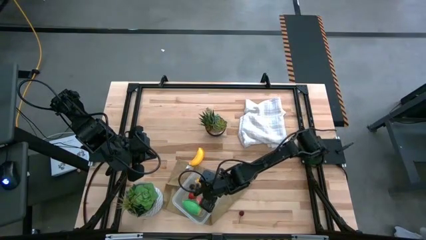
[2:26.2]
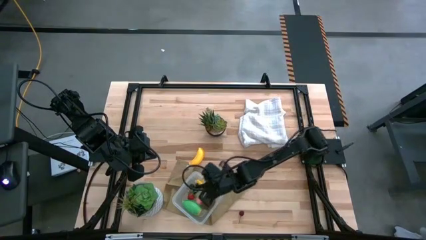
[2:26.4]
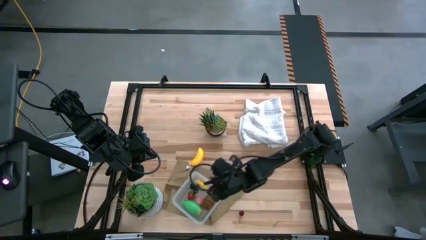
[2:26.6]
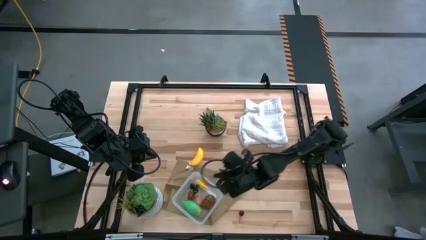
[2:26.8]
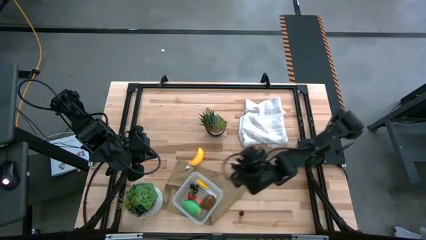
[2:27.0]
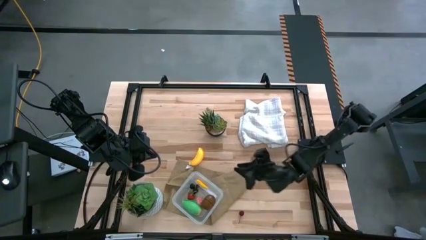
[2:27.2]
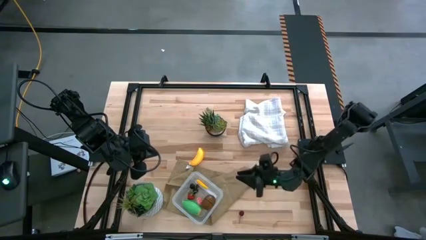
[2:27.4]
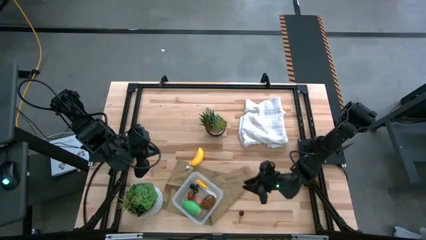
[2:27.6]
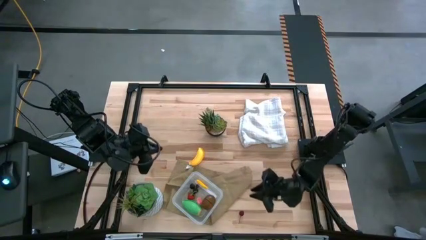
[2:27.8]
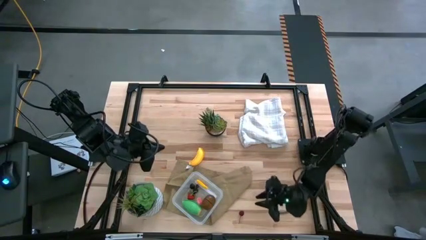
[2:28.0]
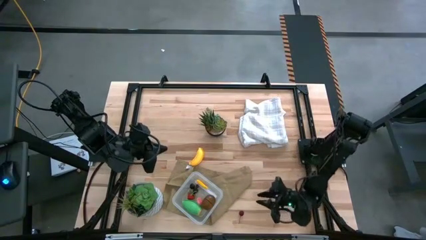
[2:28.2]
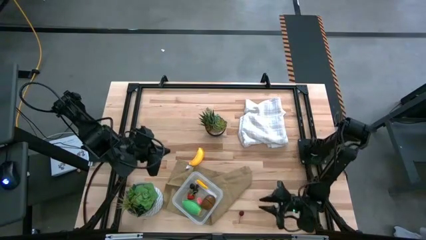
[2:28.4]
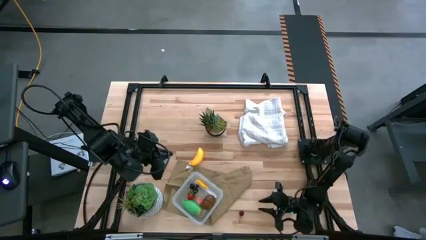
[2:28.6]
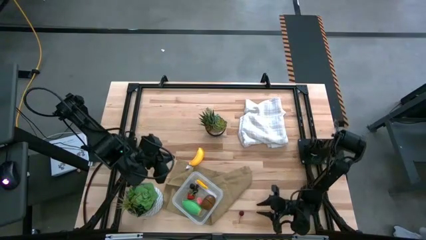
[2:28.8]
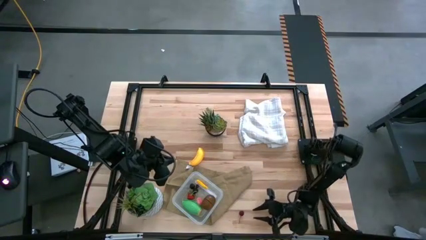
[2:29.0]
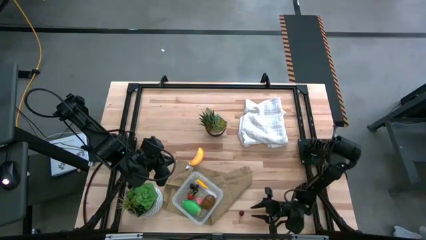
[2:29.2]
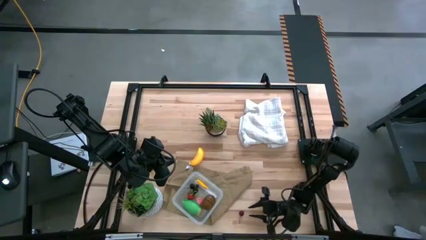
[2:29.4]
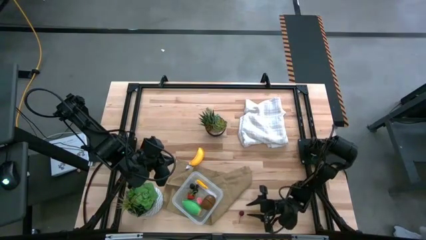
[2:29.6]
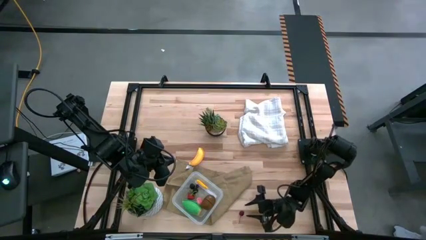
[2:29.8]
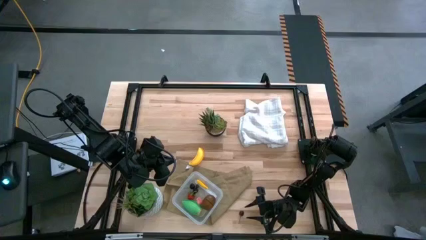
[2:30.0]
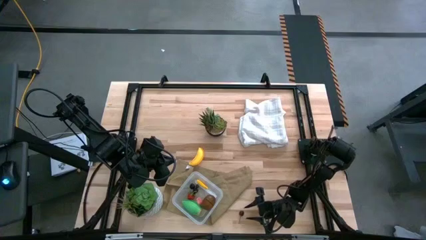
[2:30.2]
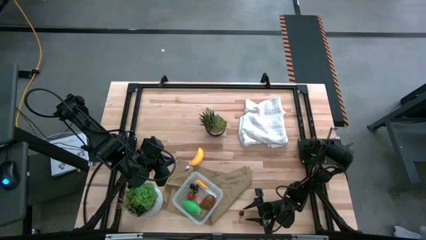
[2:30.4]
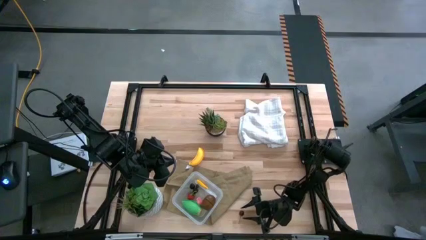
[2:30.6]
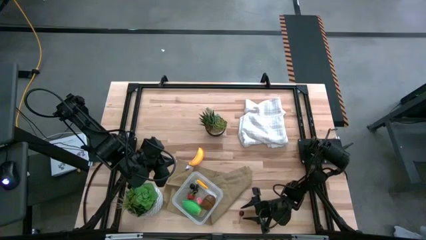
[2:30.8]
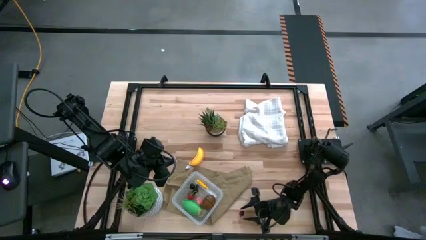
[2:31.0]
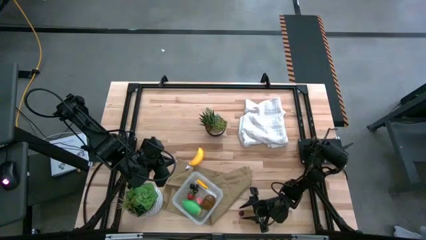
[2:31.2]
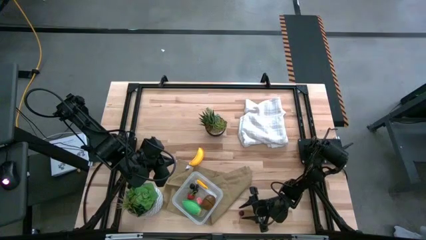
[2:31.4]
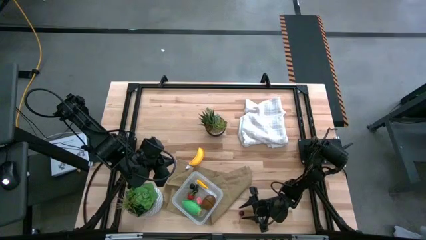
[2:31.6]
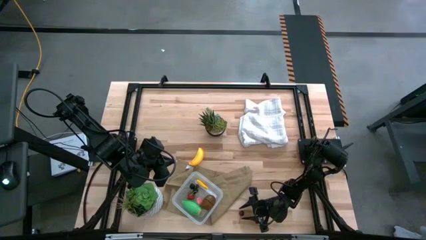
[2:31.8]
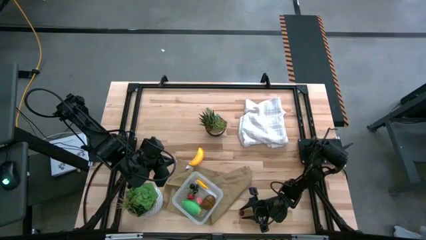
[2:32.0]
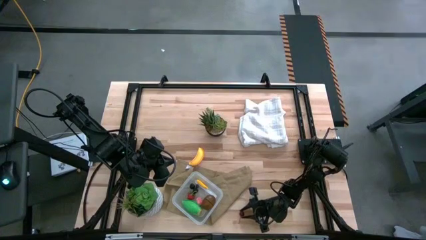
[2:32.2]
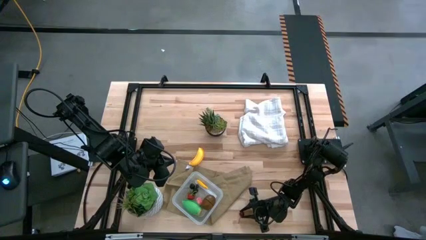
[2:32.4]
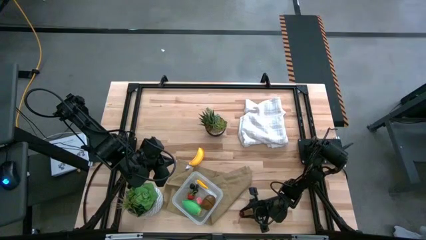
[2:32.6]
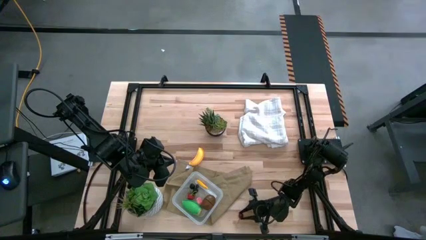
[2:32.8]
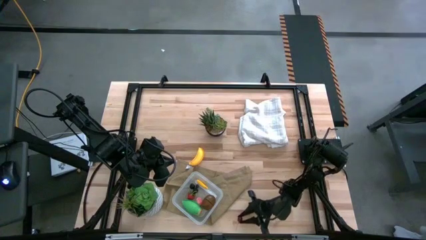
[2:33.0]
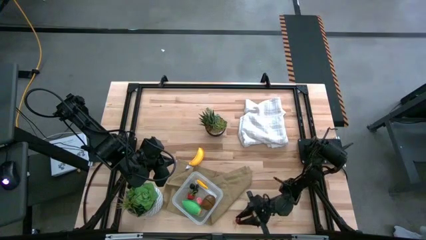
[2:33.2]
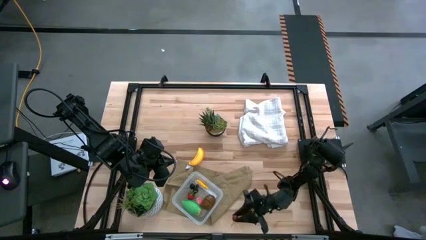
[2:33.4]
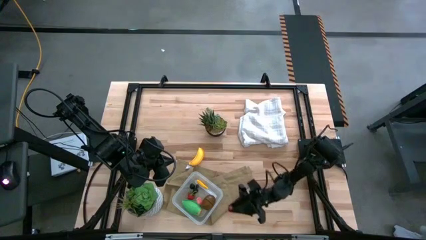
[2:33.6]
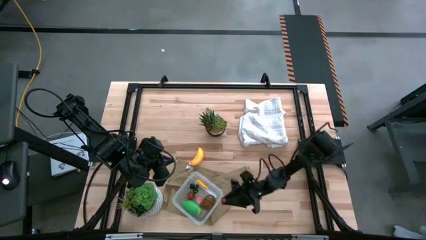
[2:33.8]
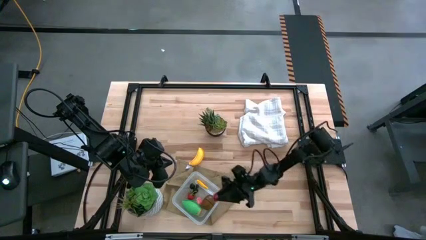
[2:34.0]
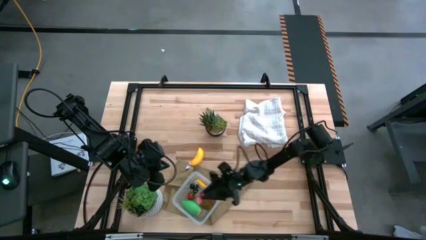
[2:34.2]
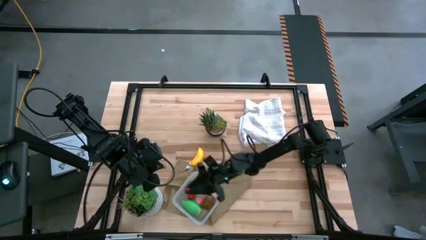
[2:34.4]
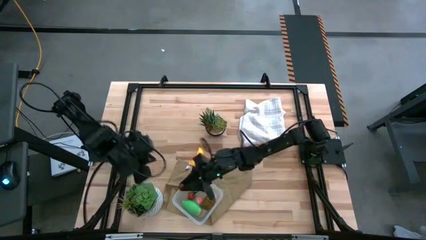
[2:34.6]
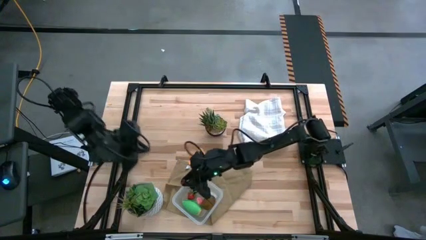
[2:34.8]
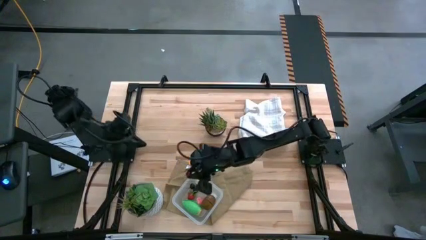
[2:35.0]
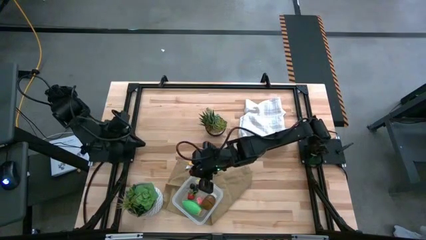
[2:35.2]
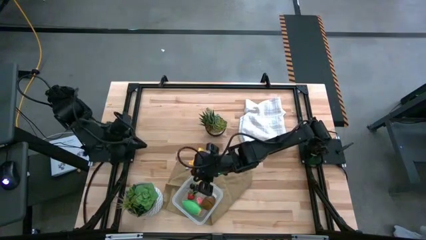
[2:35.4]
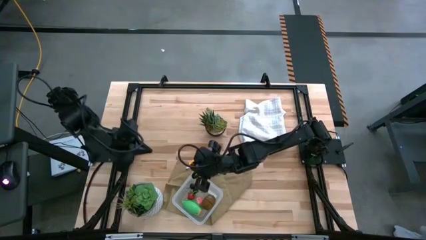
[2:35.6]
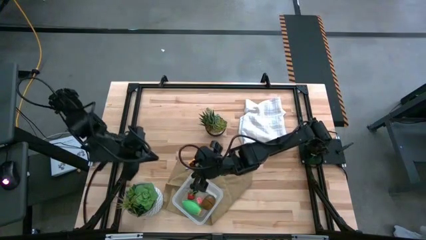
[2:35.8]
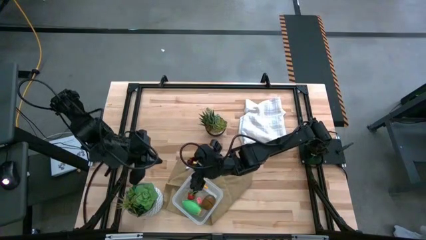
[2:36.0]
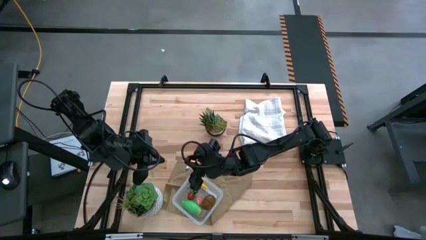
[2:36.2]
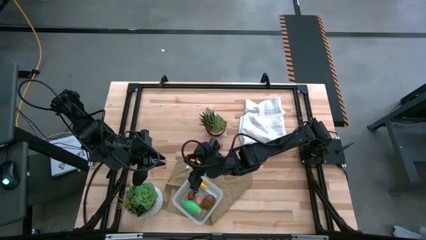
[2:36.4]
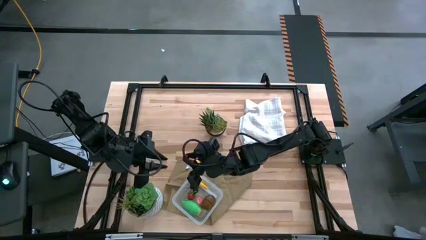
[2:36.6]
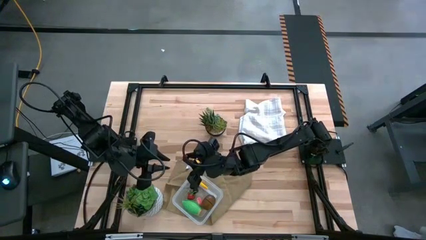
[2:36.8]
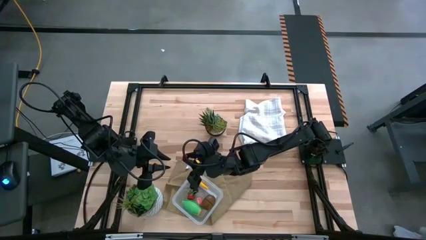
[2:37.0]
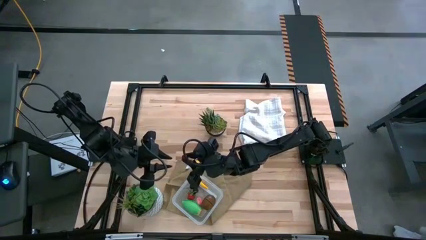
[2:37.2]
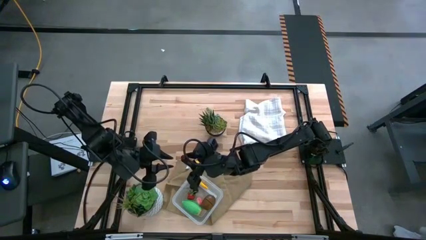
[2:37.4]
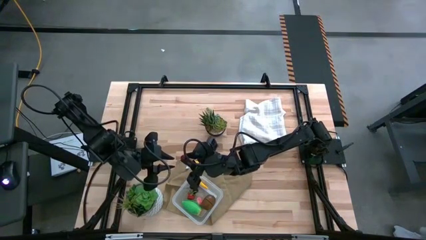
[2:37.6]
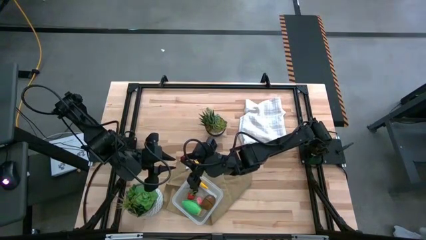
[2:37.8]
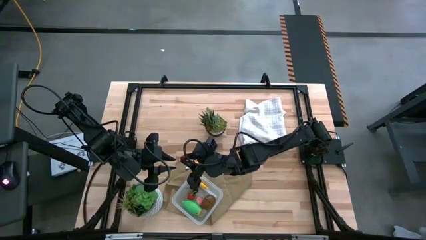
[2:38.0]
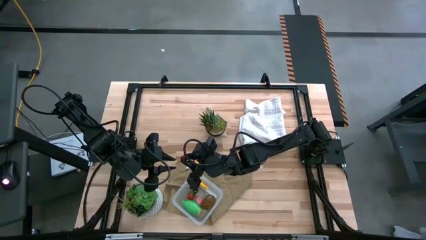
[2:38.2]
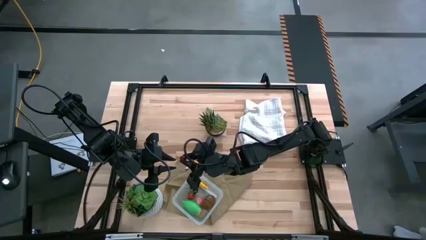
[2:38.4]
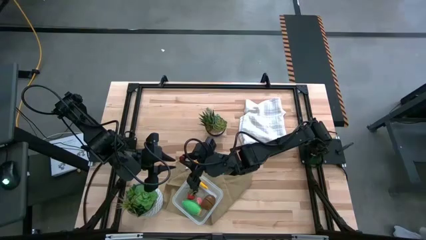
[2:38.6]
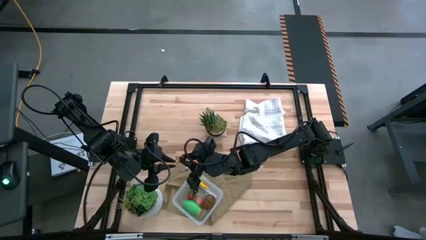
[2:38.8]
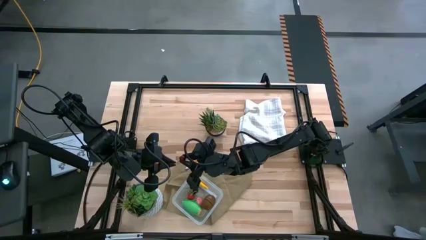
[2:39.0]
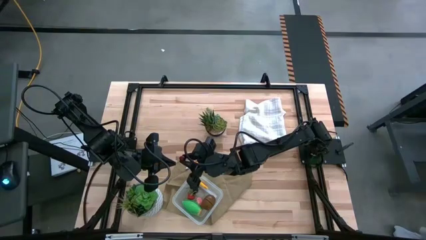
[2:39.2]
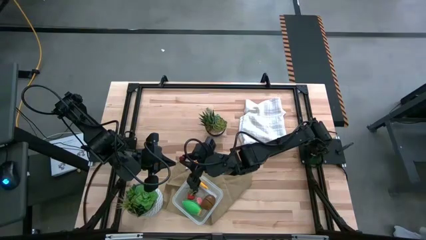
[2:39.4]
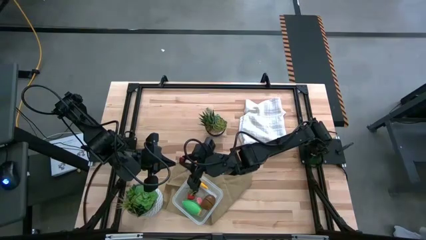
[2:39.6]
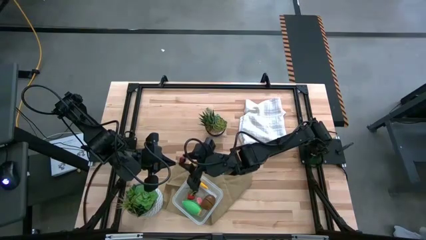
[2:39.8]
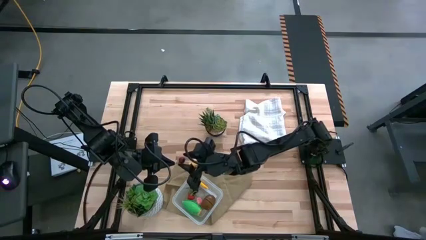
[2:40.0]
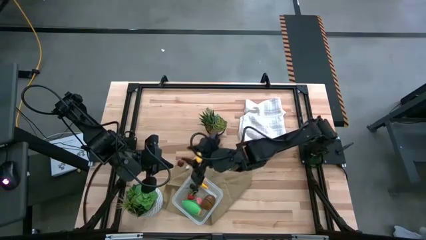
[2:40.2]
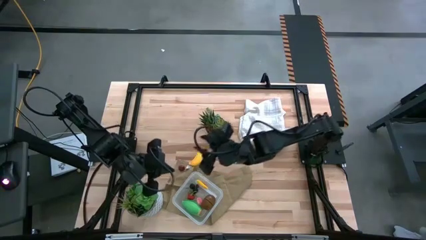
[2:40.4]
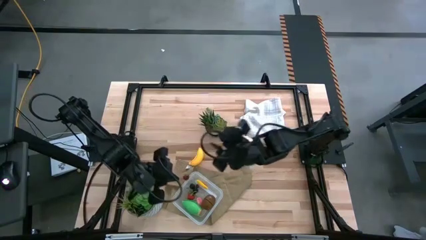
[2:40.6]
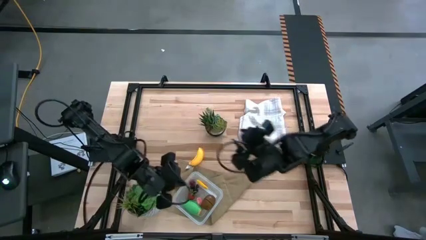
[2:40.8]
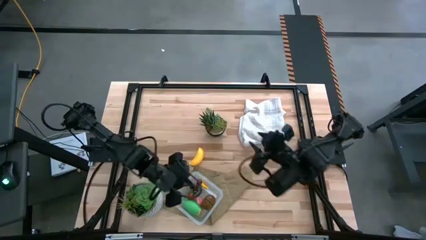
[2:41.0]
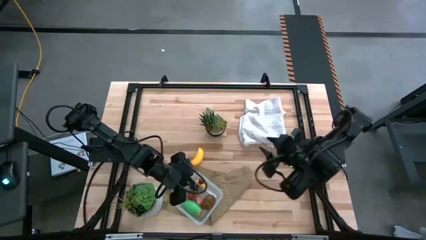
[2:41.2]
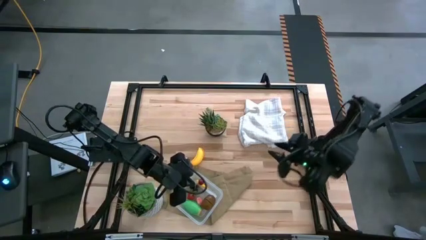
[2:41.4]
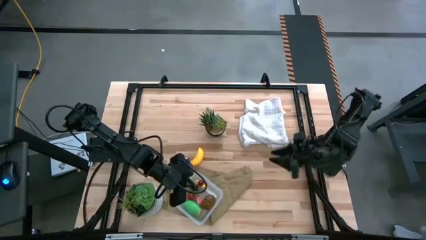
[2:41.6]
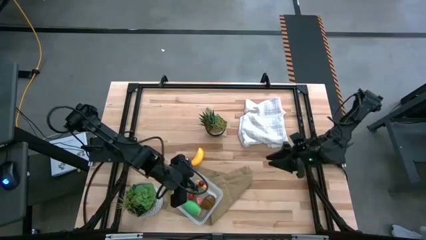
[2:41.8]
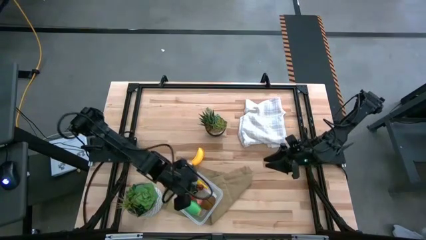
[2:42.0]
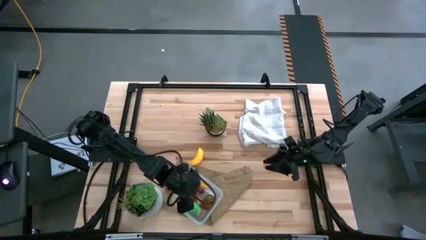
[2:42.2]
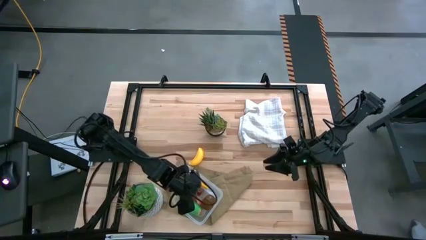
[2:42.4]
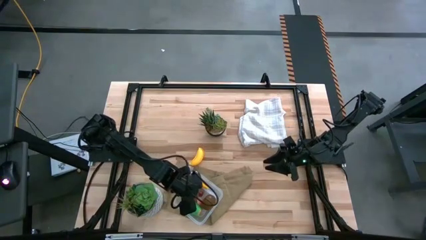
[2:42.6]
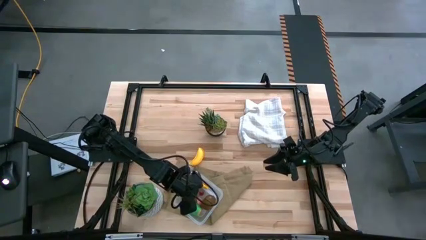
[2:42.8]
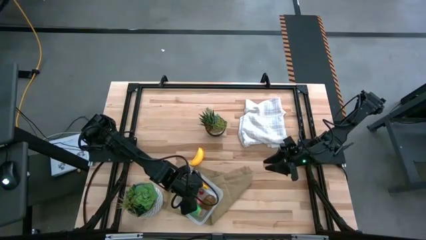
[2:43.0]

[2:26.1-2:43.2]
Task: Pick and placing Produce into tupperware
Put the red cherry into the container
